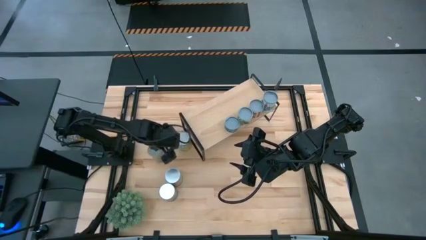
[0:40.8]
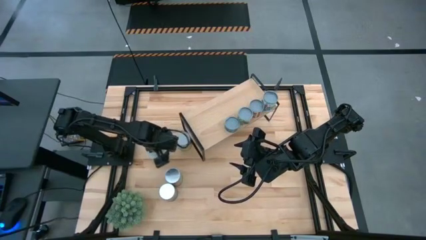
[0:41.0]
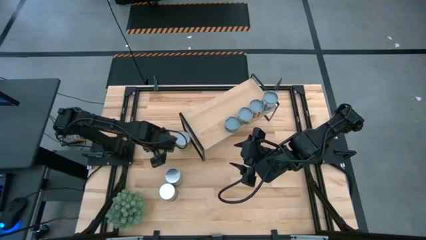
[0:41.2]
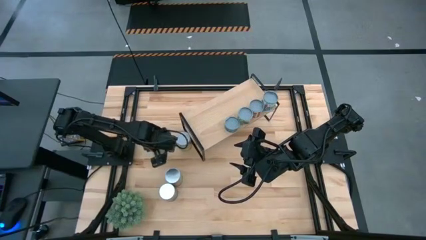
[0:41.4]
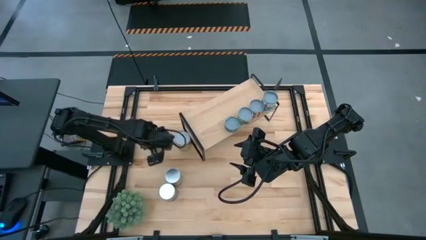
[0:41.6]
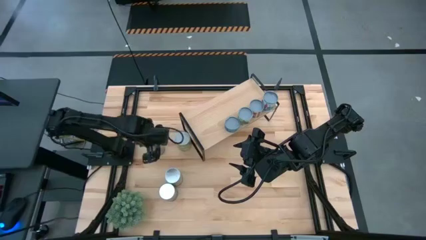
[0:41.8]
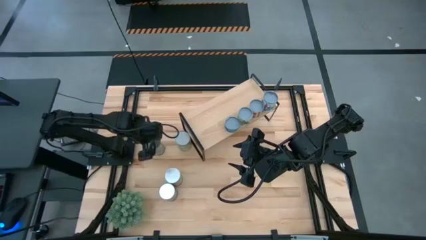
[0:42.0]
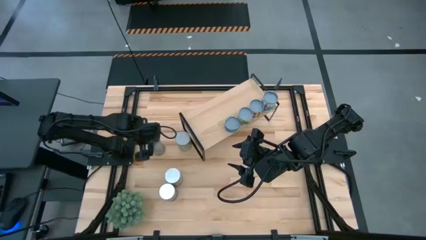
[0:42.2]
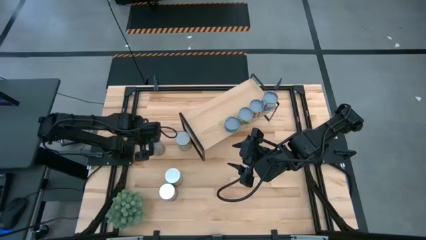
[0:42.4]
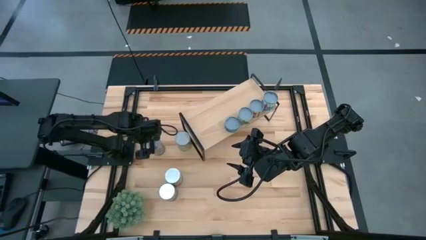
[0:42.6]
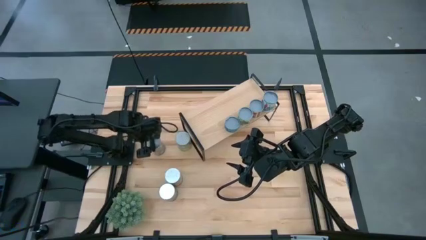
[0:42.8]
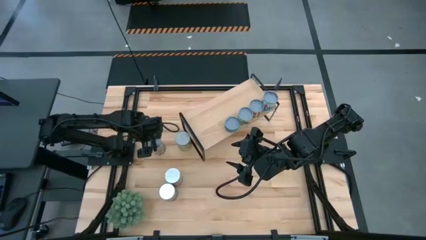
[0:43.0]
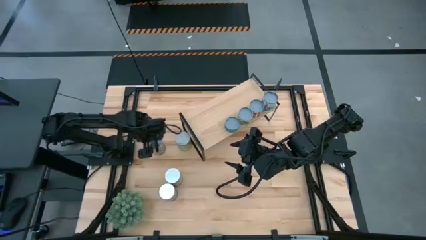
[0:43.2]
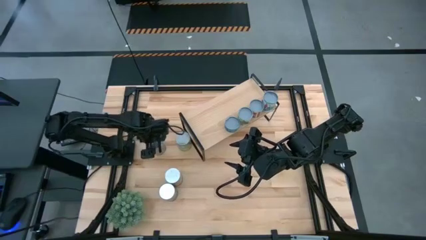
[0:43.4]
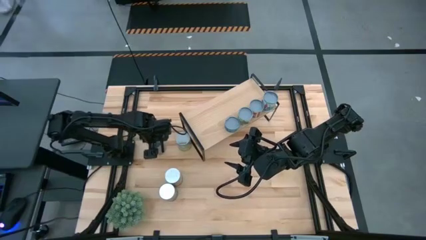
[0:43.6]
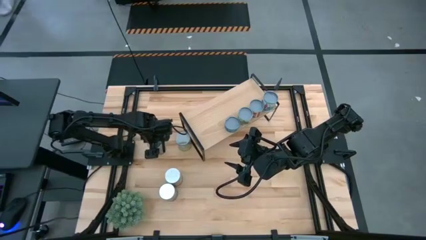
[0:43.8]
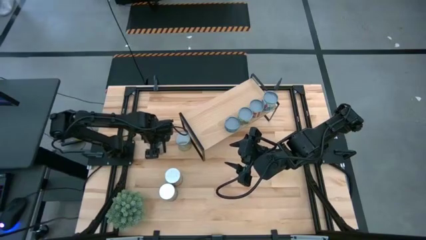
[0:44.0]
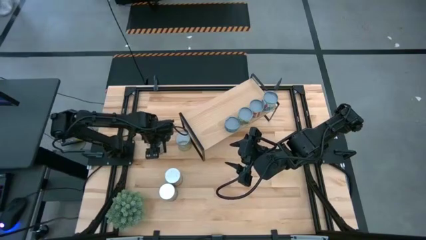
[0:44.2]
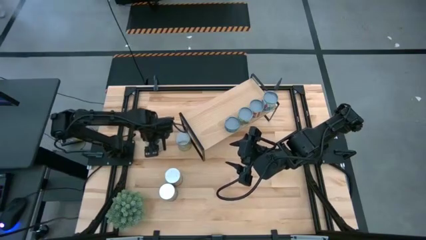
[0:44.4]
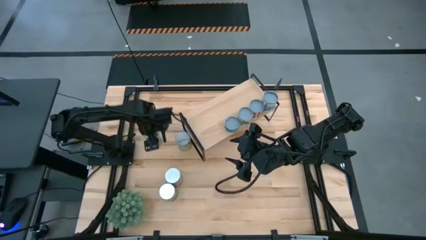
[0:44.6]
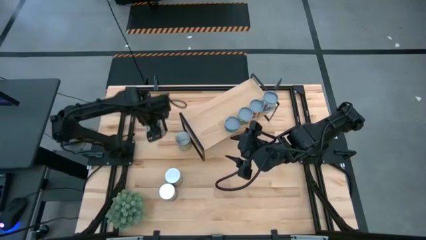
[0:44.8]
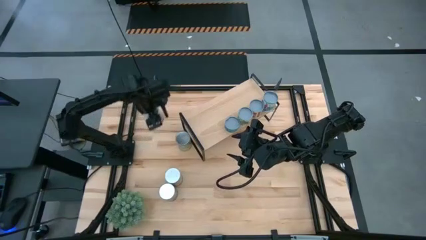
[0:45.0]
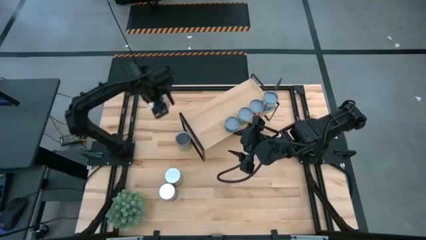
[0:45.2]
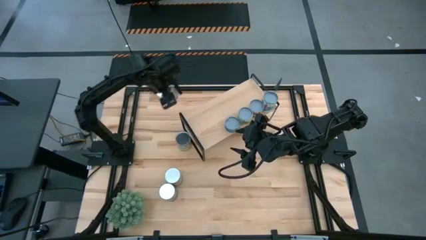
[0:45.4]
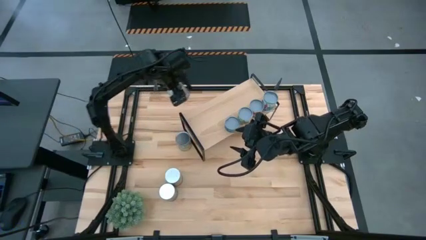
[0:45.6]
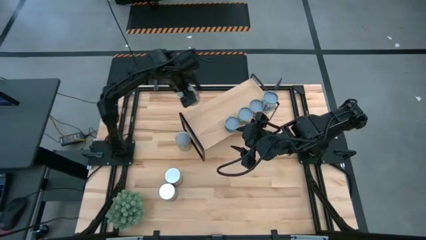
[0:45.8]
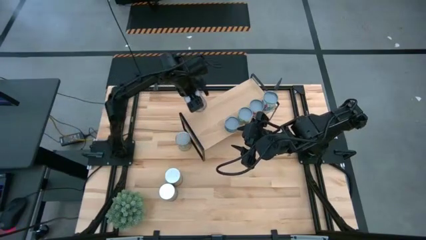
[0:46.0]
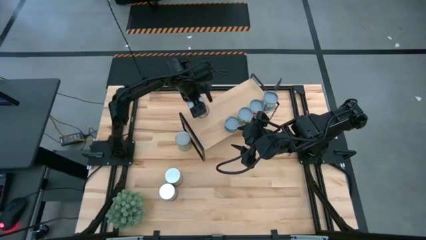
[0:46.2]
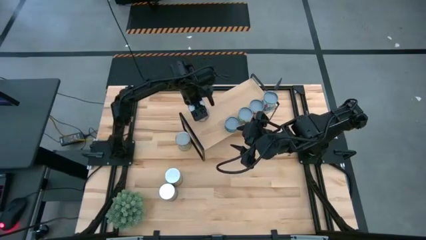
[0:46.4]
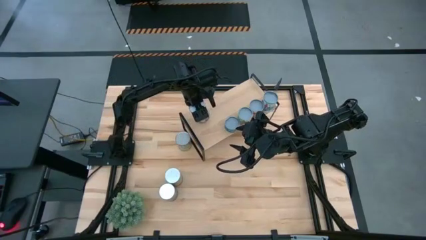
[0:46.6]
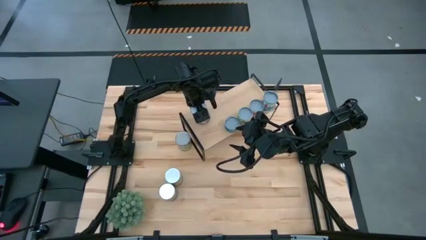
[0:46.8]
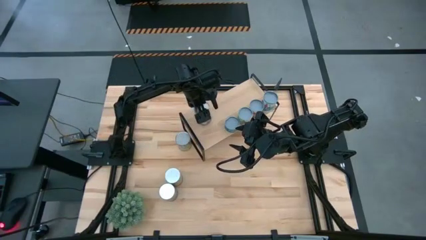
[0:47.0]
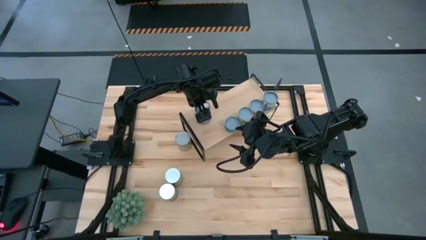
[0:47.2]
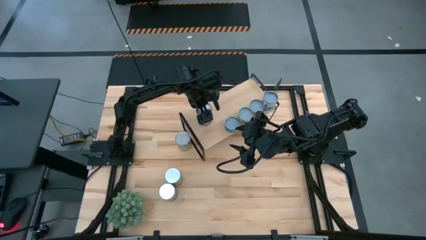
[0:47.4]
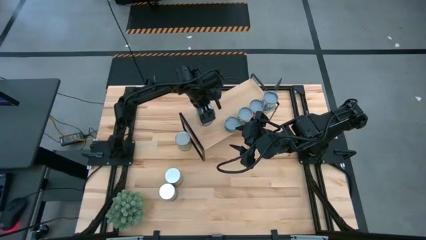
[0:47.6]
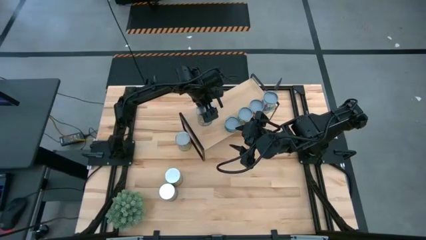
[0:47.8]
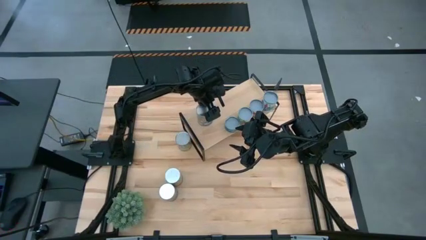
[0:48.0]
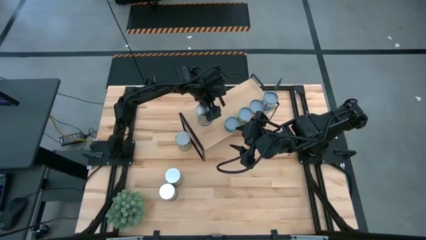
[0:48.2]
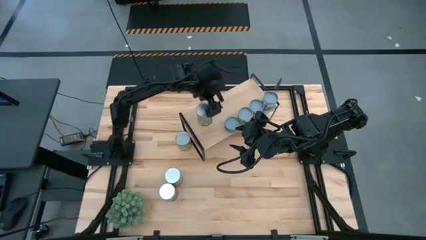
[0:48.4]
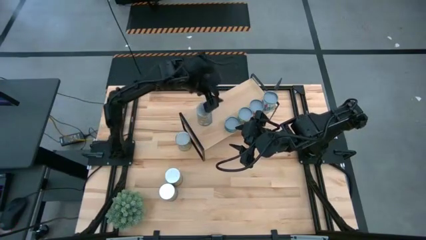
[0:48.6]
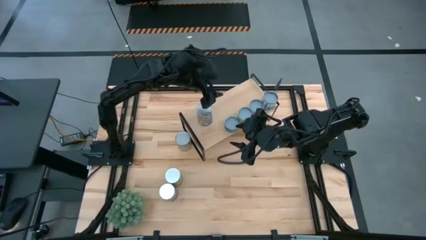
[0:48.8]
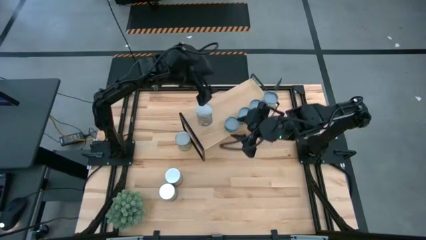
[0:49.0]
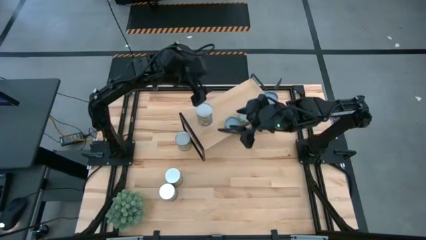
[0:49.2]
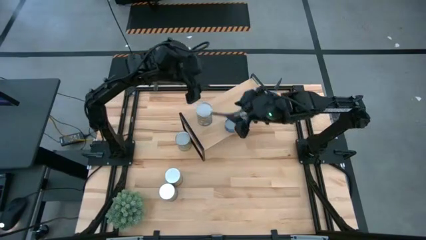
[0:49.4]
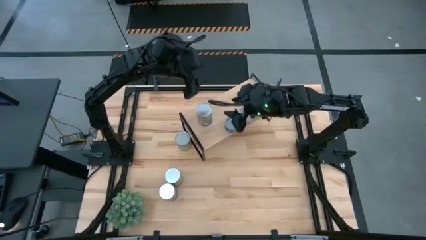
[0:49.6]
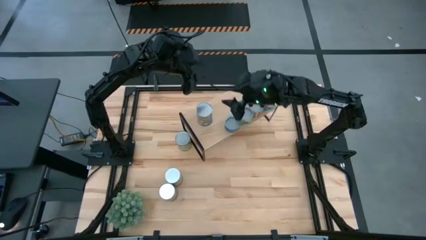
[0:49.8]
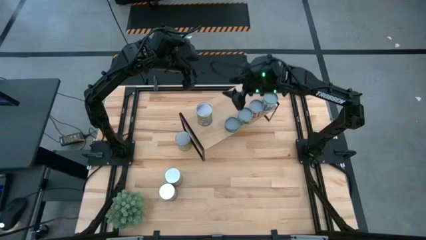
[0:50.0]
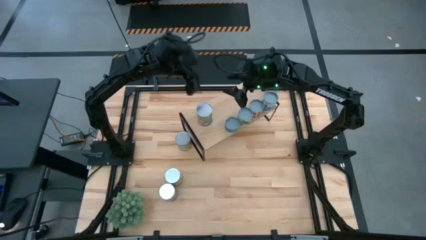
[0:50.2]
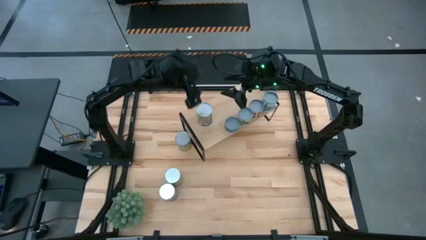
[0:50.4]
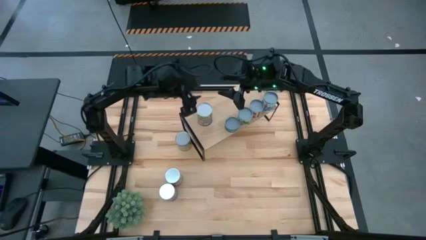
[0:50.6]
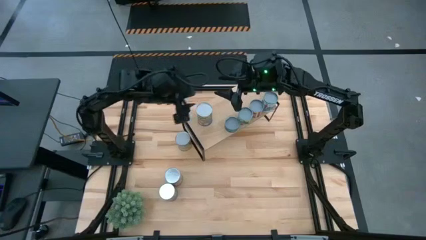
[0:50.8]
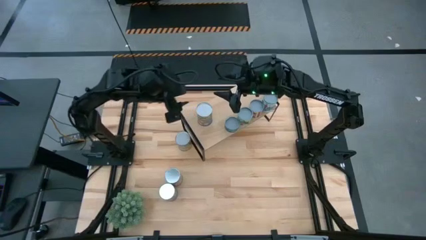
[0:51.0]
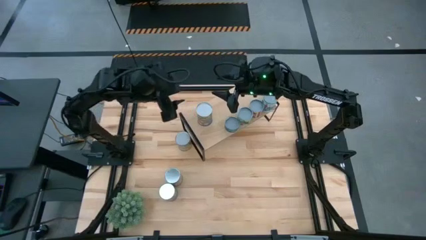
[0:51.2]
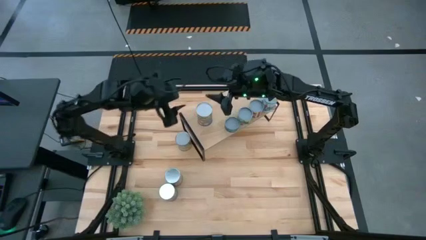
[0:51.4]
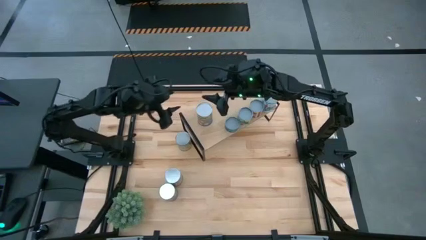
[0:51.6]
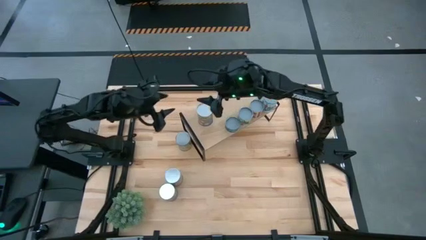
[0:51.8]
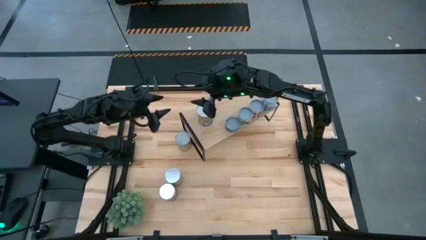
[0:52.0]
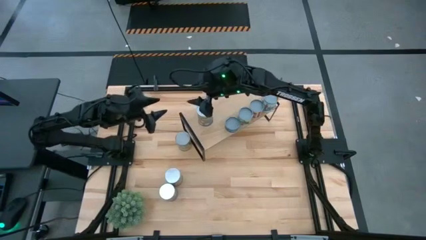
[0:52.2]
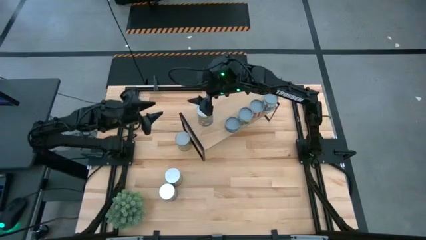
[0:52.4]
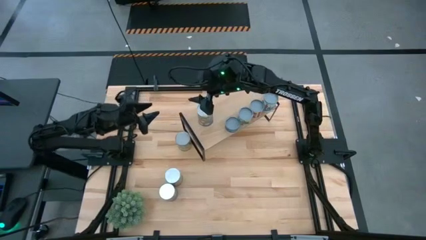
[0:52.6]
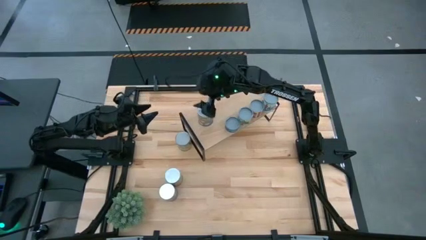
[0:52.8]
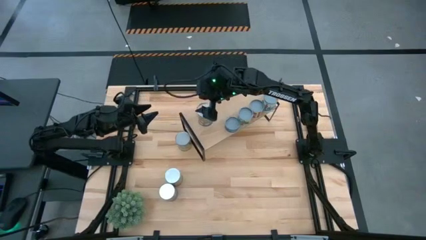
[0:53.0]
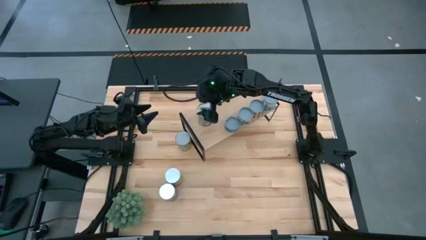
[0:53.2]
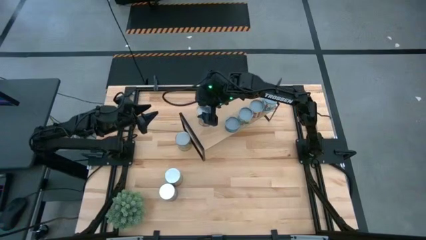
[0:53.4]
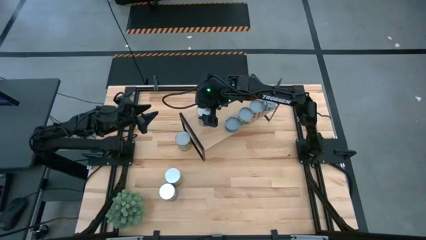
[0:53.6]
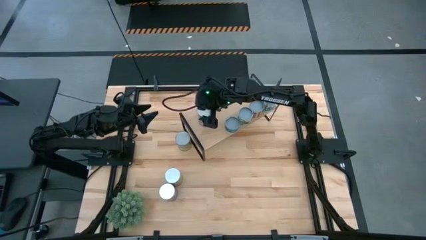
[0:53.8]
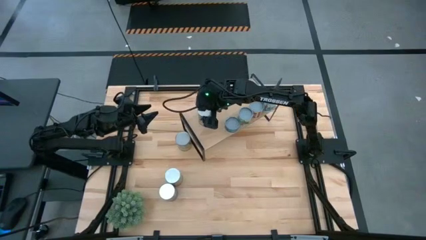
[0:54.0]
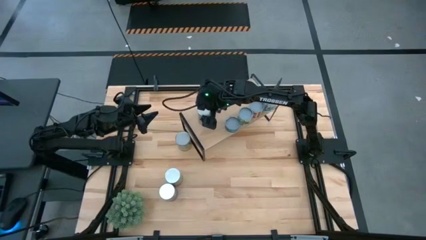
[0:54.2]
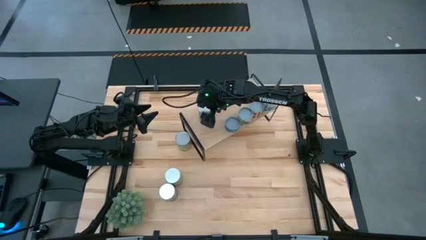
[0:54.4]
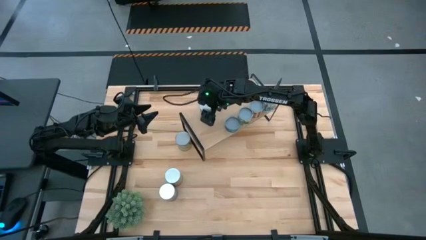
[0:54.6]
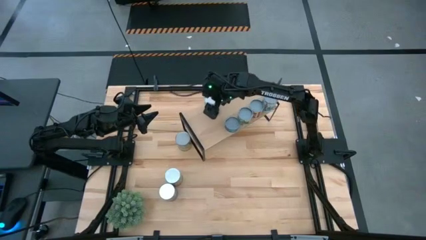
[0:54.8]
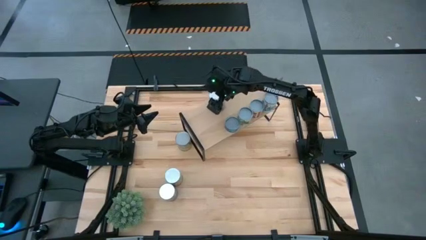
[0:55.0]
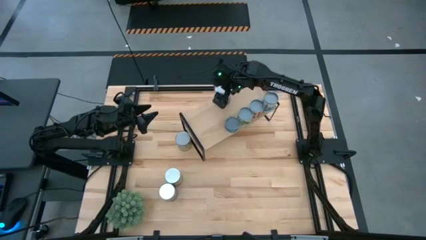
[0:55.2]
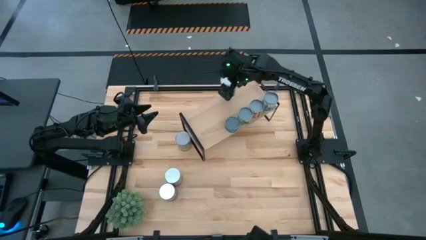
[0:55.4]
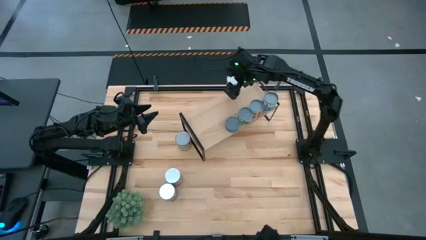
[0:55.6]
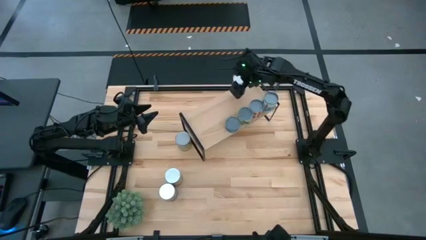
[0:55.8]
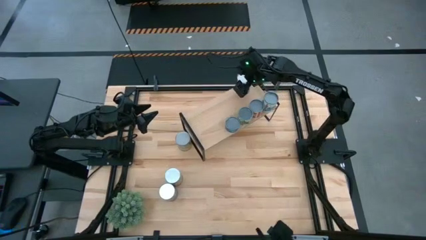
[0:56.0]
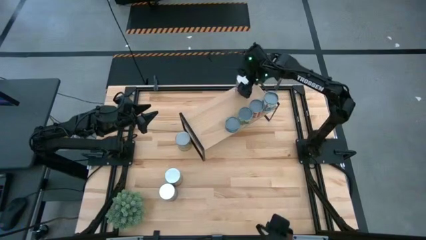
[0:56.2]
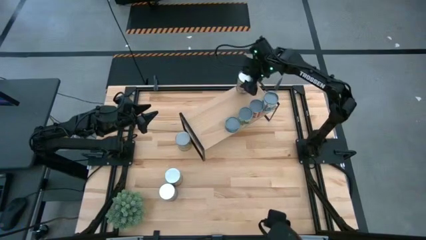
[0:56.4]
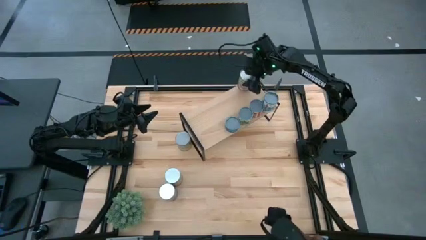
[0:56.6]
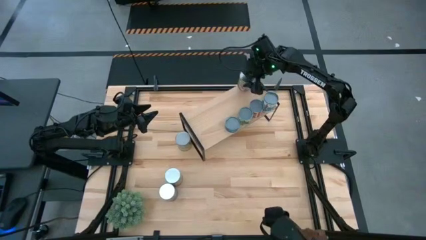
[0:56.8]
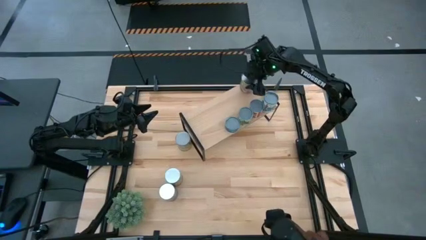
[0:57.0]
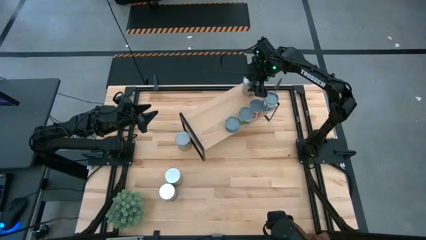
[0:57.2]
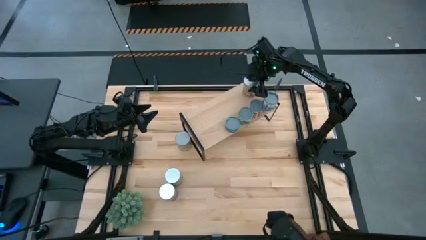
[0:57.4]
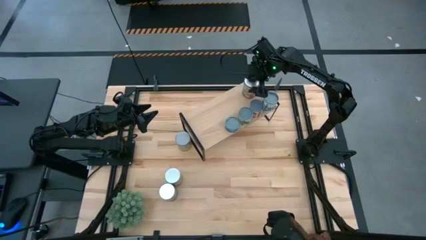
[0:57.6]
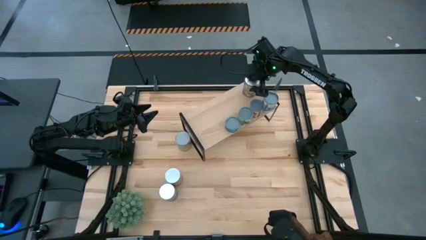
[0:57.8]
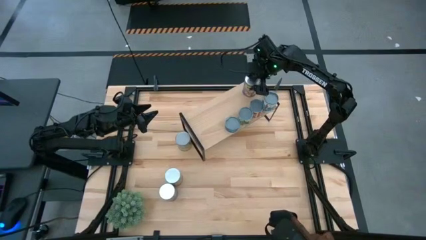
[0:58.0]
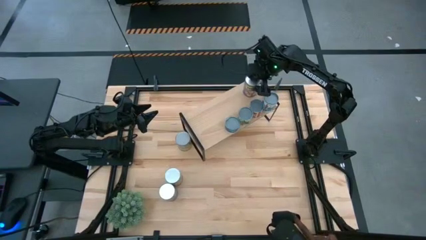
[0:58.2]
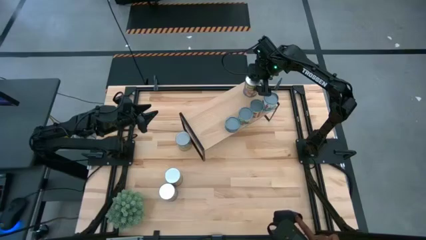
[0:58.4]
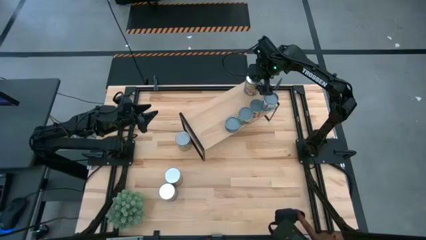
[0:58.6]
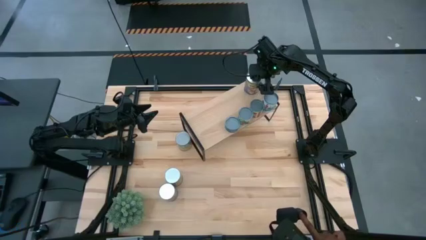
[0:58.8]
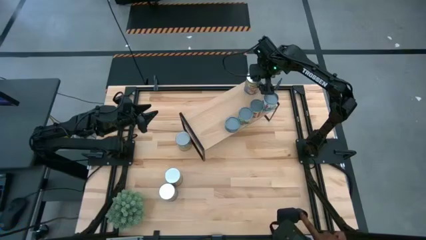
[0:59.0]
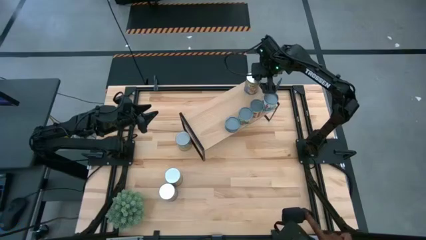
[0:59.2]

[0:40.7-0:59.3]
Task: Pick and place cans onto a shelf
Put the canned peaches on the shelf
